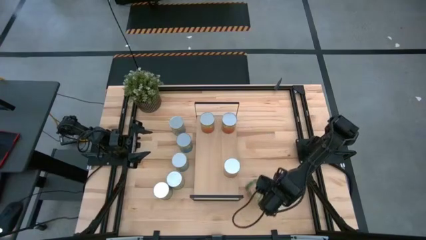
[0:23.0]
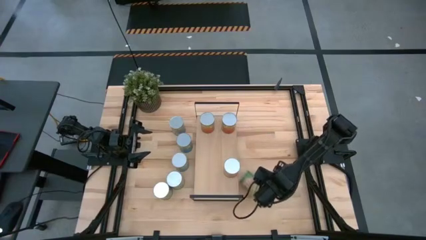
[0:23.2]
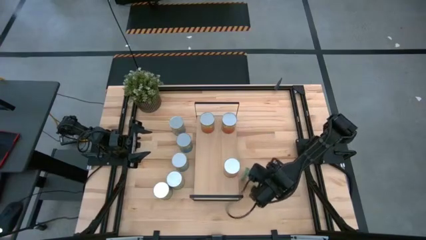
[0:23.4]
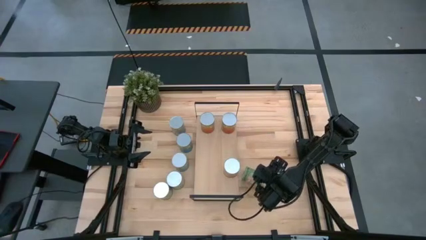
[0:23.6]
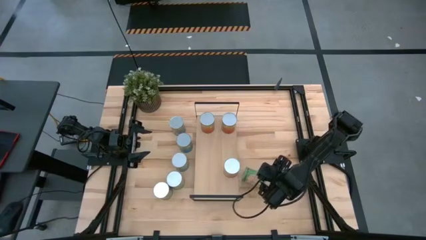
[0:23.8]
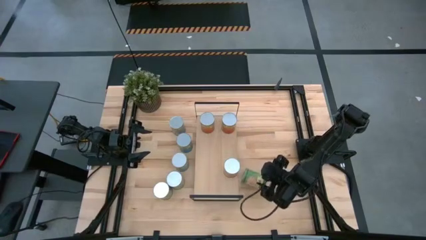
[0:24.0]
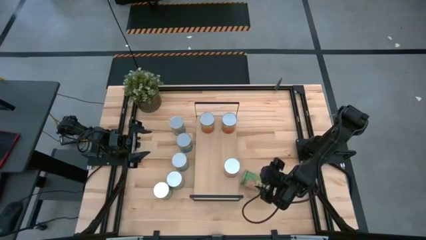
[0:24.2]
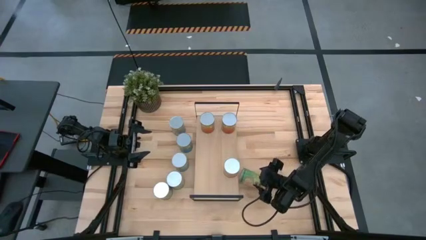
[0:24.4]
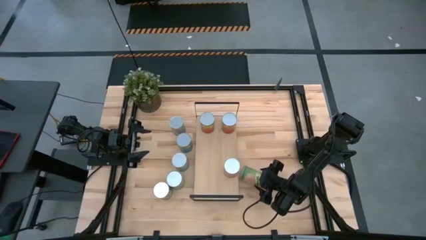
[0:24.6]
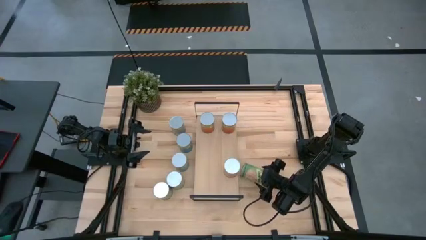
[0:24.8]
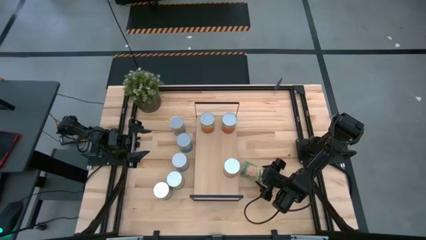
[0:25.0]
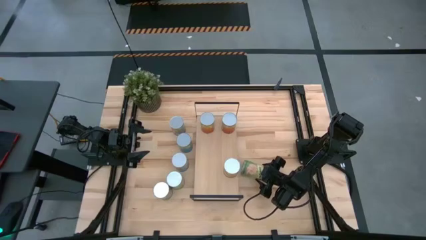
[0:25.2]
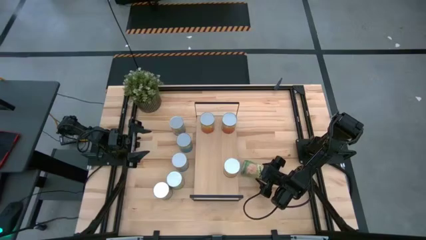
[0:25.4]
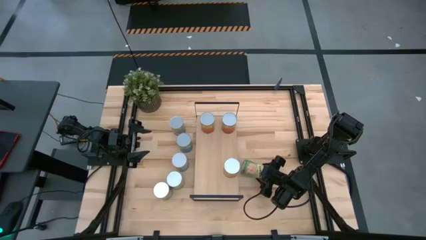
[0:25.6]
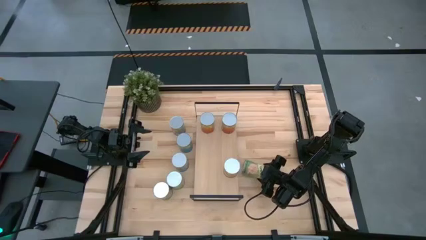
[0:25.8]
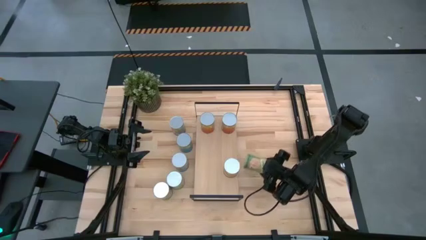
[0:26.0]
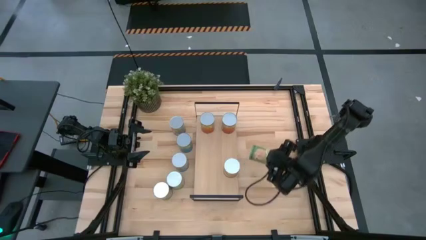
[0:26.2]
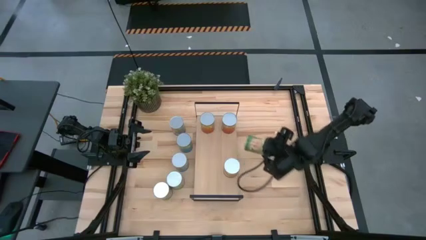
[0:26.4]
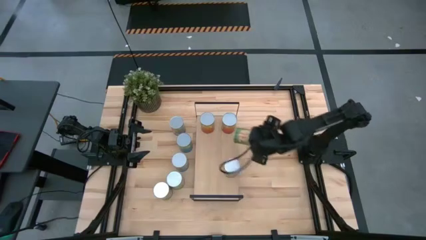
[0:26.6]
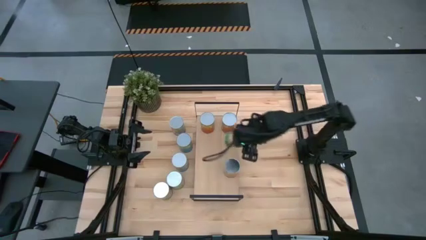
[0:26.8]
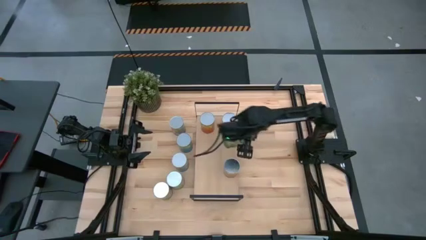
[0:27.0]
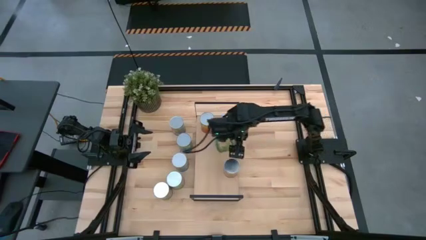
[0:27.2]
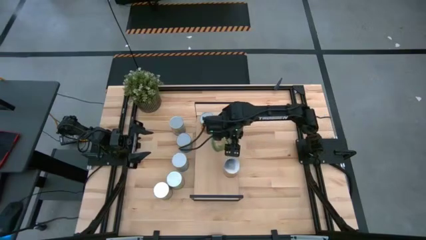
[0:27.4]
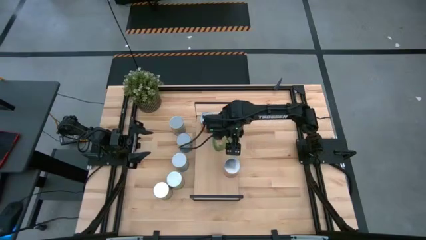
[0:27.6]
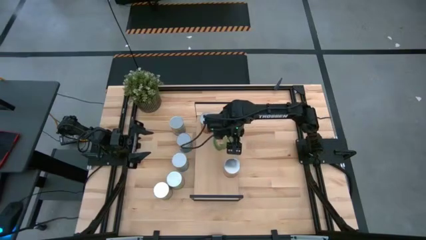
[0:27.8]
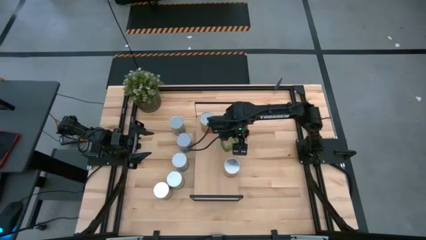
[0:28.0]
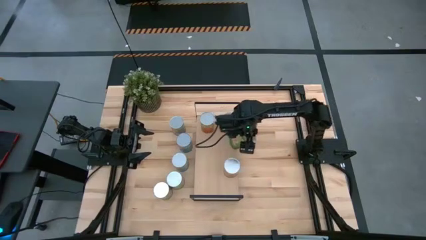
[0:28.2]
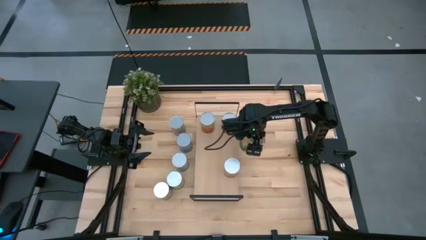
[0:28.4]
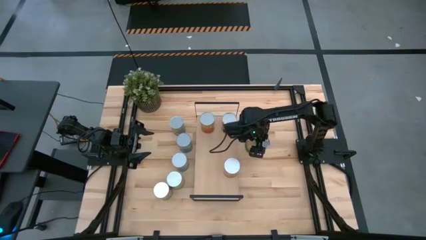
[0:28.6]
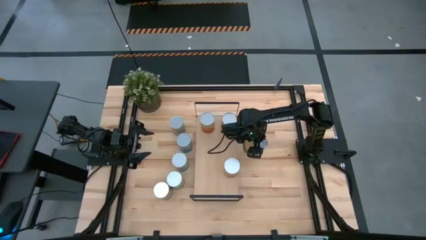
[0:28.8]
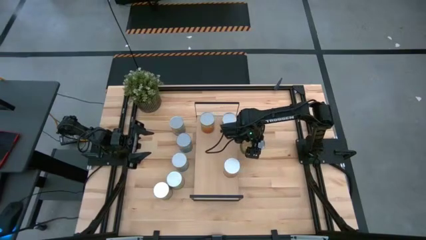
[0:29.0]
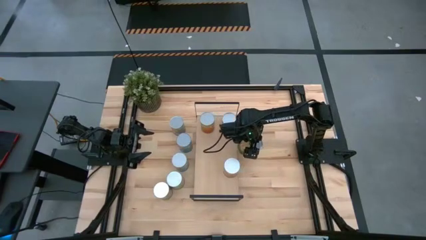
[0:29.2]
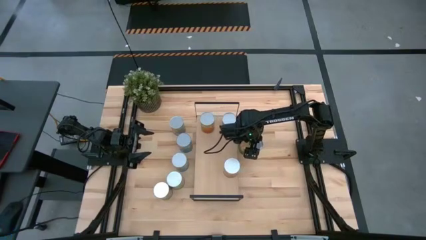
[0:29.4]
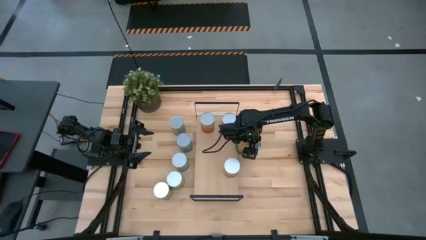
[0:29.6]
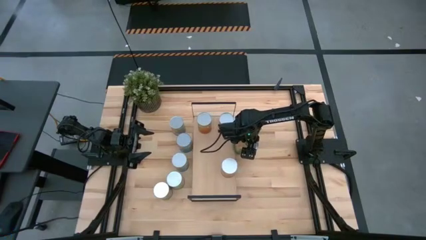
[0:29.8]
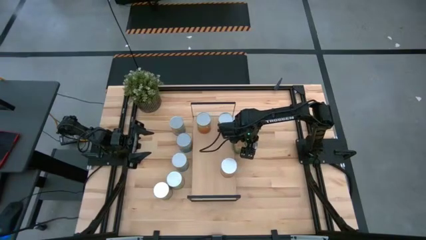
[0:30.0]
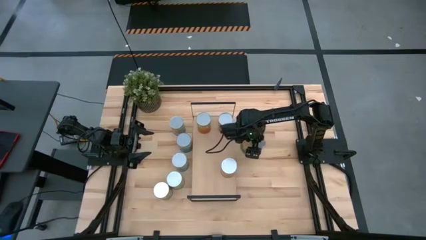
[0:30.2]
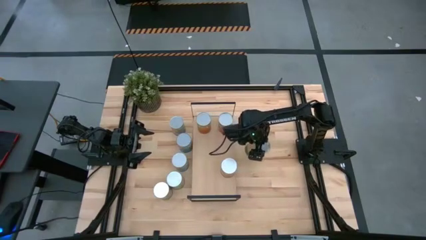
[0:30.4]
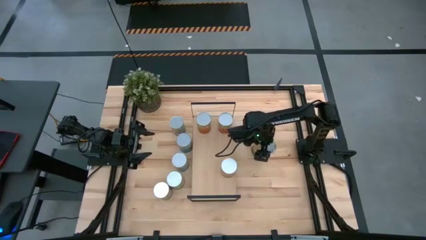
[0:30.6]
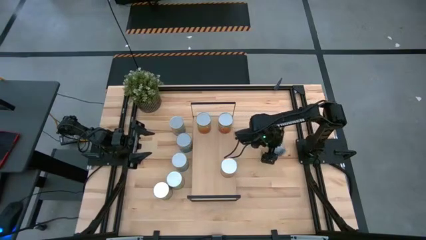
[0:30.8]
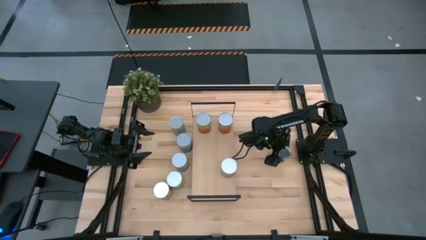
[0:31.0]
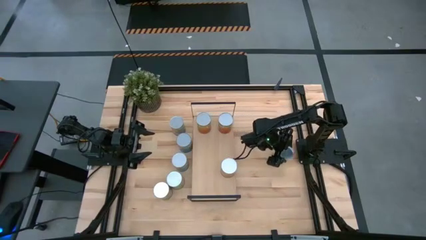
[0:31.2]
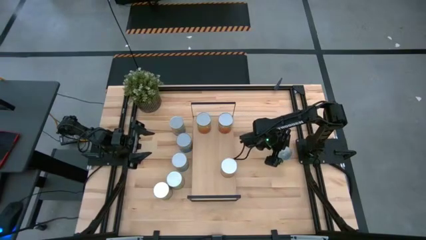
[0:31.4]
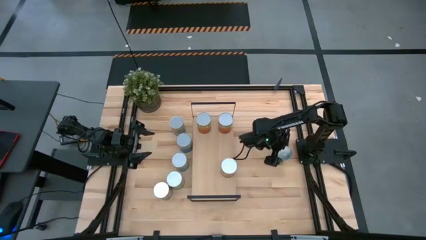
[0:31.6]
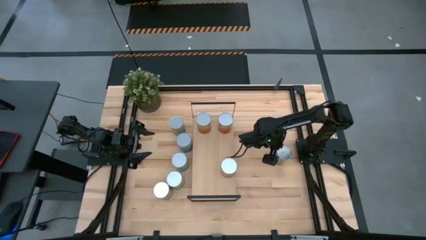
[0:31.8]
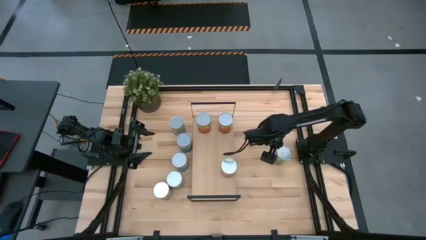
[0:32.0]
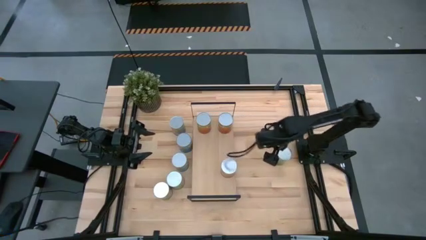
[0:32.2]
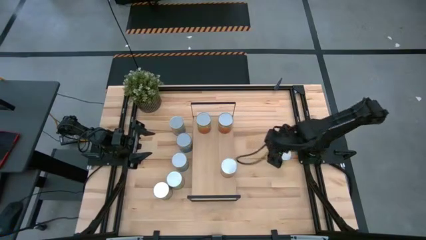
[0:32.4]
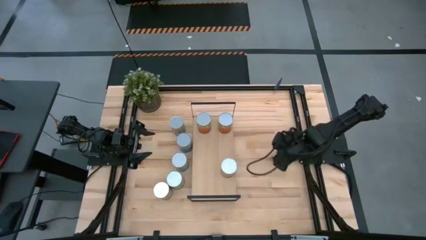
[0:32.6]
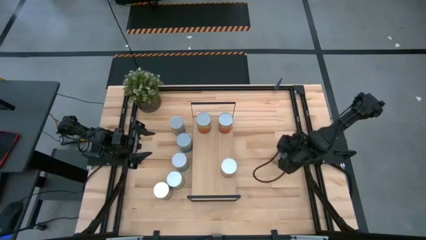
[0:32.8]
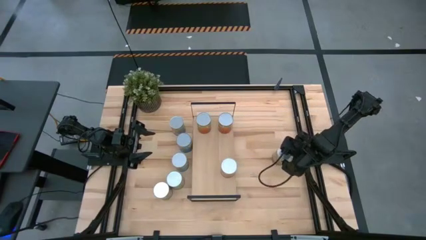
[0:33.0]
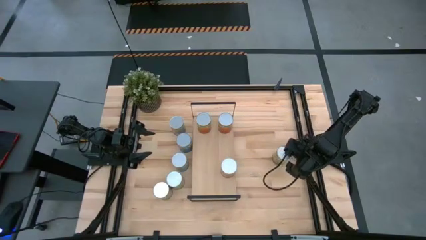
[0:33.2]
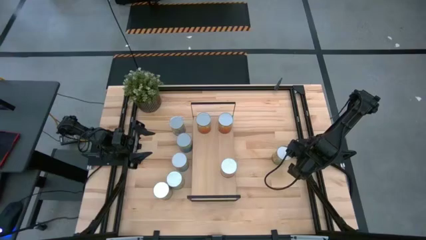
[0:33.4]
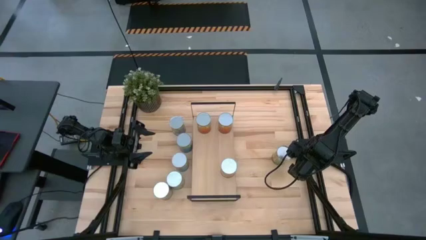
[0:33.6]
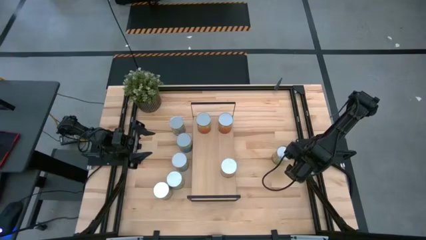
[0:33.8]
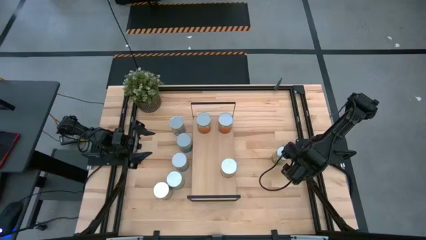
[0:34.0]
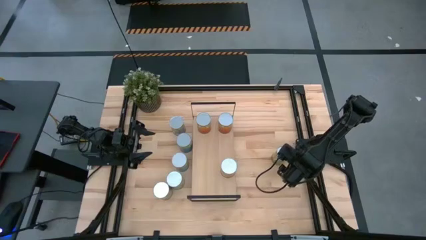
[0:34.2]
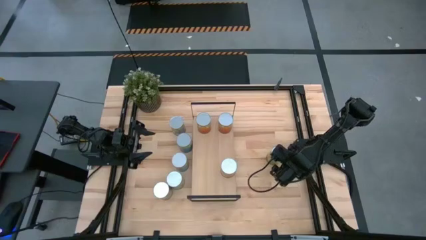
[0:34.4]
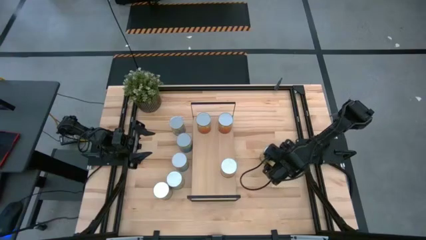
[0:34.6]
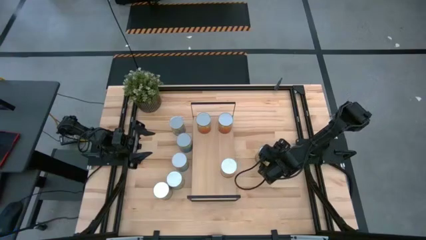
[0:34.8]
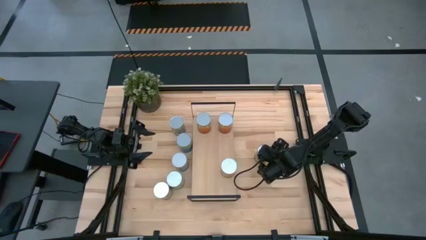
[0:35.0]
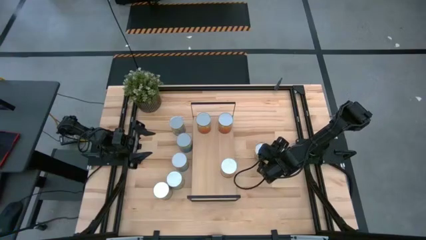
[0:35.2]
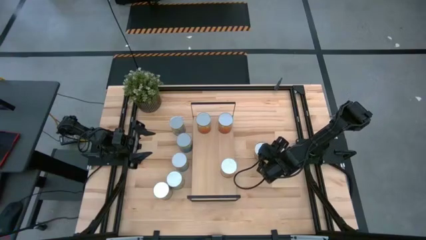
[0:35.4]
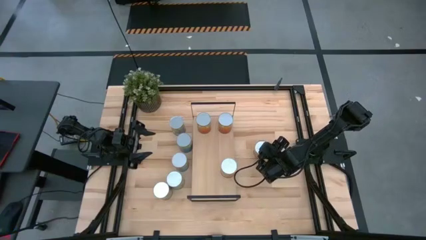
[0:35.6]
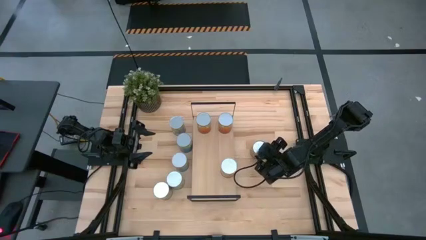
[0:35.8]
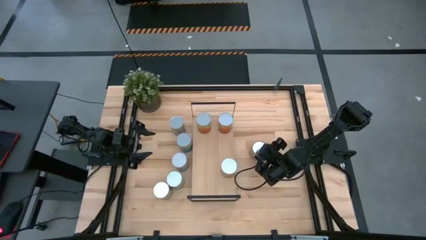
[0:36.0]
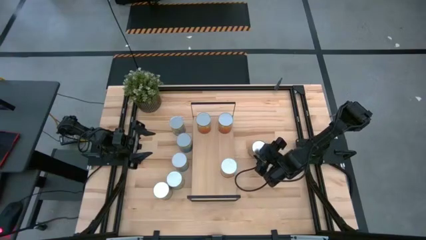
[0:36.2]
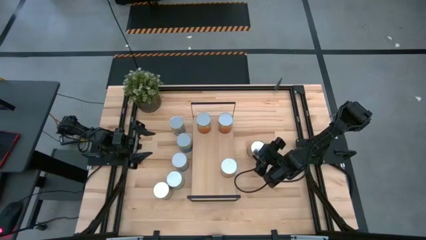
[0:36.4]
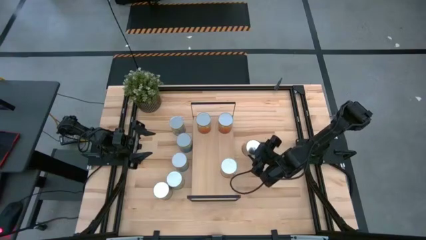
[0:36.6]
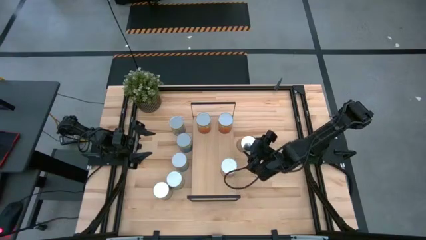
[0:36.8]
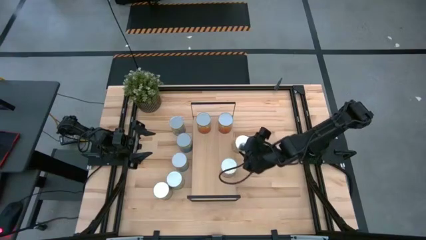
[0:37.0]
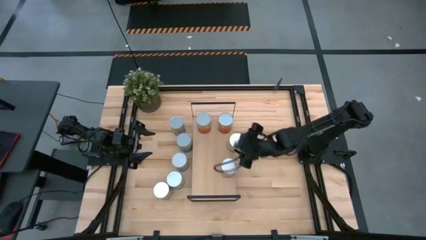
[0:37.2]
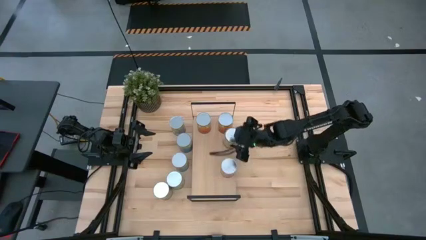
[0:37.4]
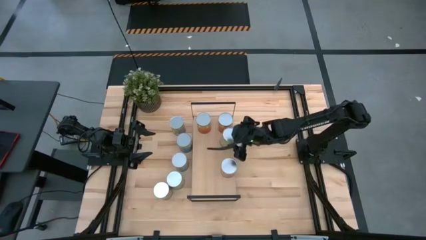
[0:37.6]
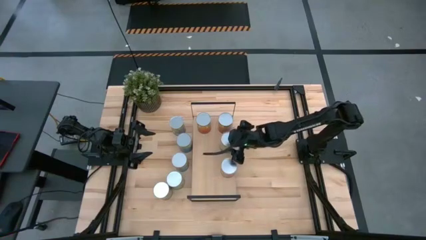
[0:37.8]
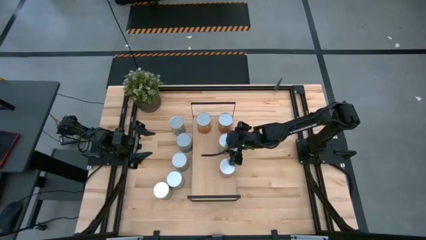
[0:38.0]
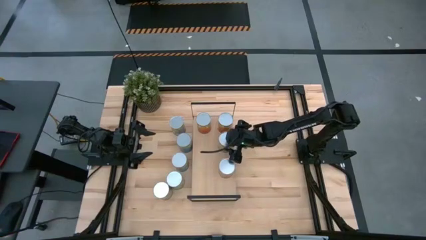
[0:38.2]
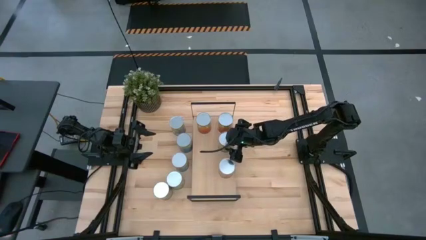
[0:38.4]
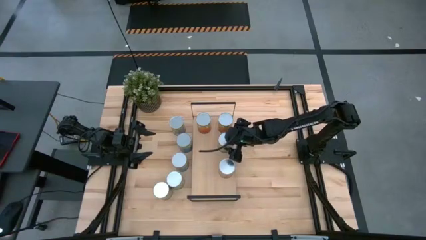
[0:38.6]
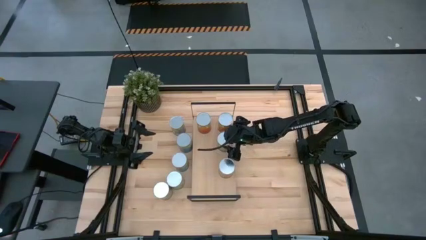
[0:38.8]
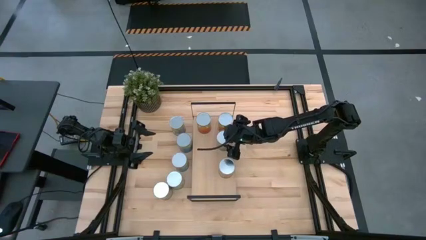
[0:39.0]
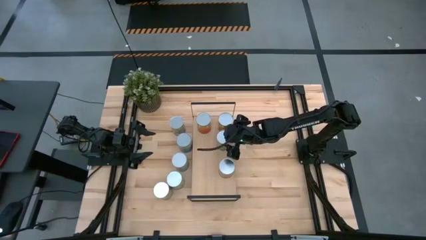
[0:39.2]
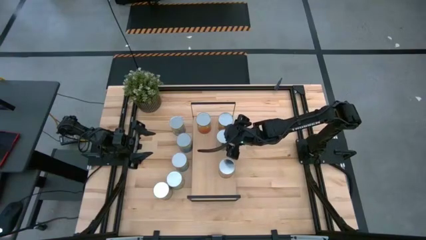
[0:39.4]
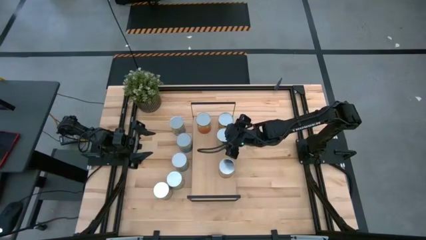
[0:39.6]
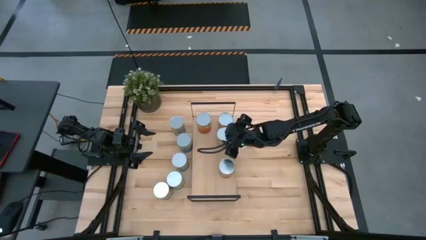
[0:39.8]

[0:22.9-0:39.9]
Task: Pick and place cans onto a shelf
Put the right canned oranges on the shelf
